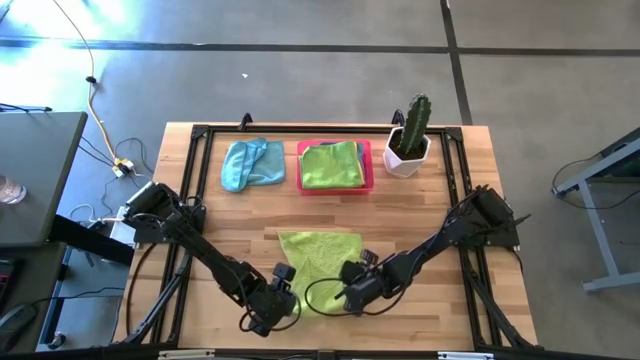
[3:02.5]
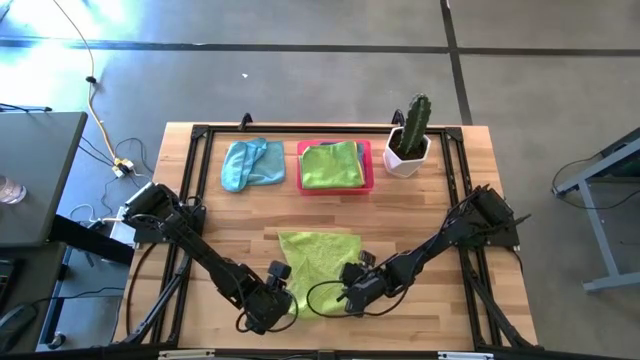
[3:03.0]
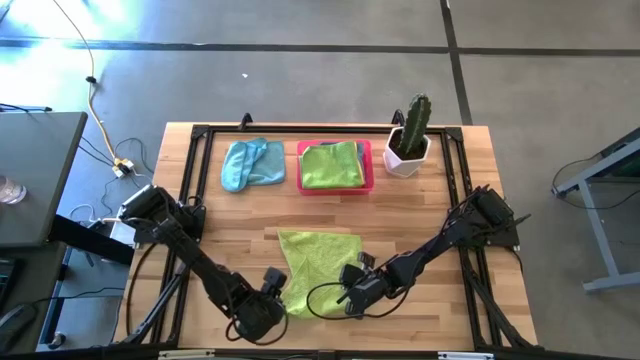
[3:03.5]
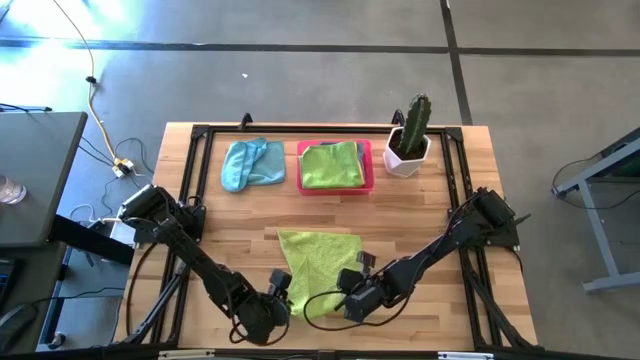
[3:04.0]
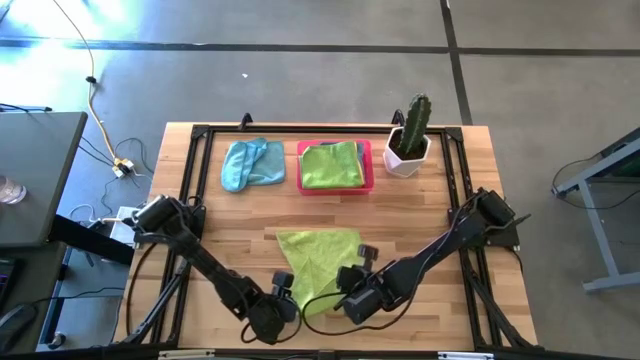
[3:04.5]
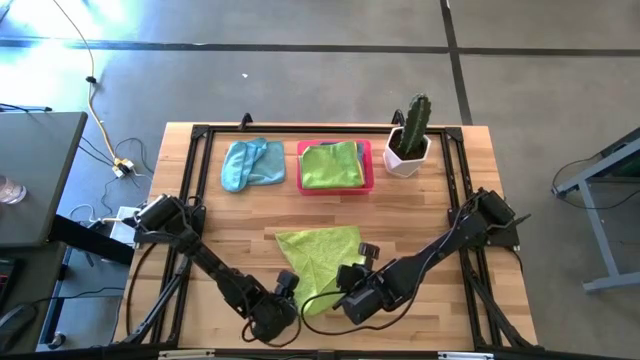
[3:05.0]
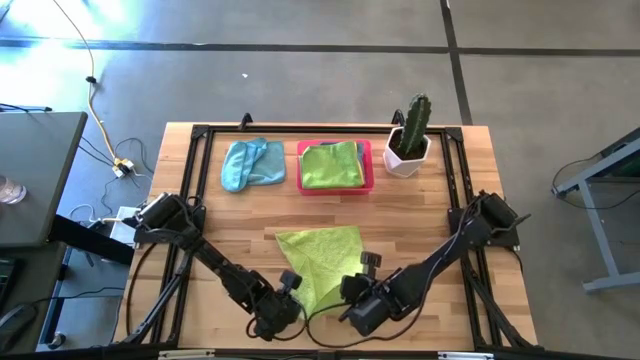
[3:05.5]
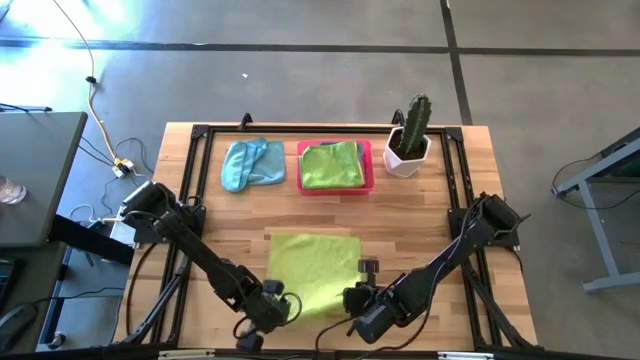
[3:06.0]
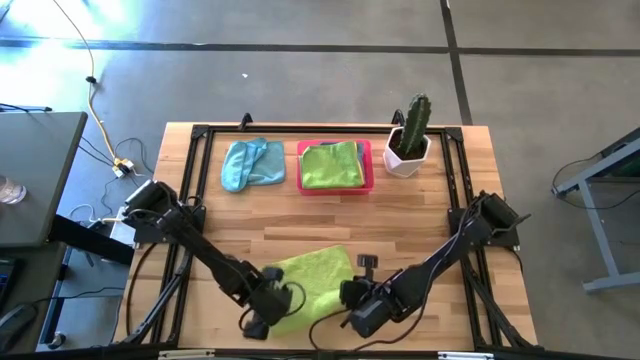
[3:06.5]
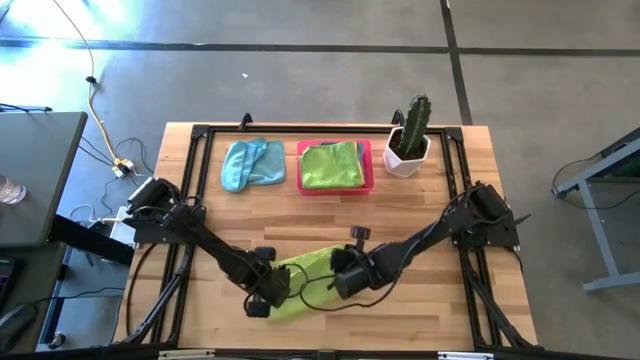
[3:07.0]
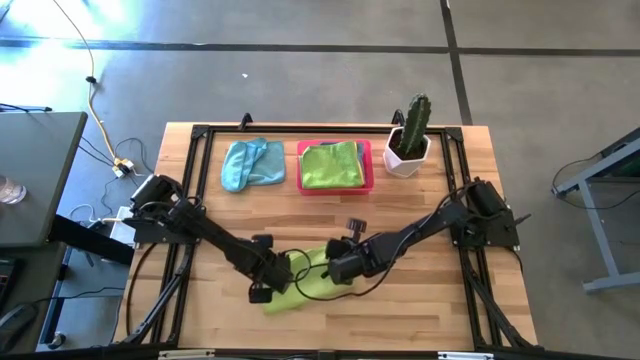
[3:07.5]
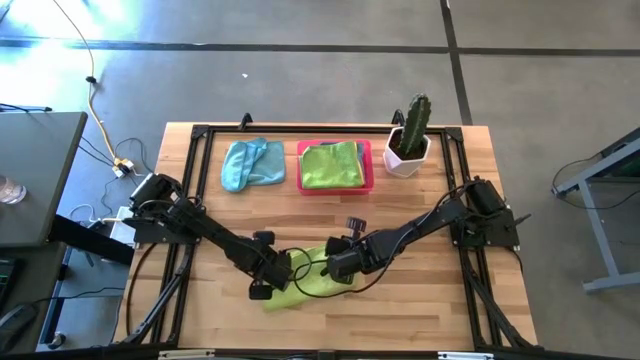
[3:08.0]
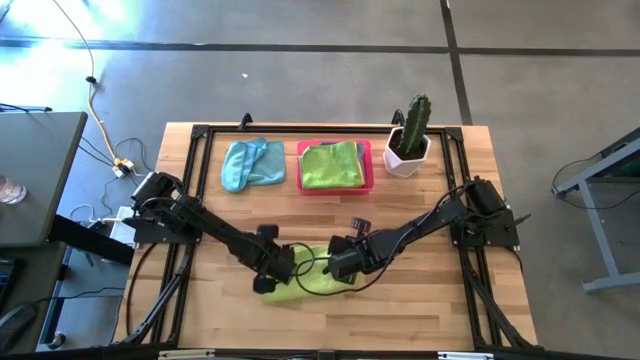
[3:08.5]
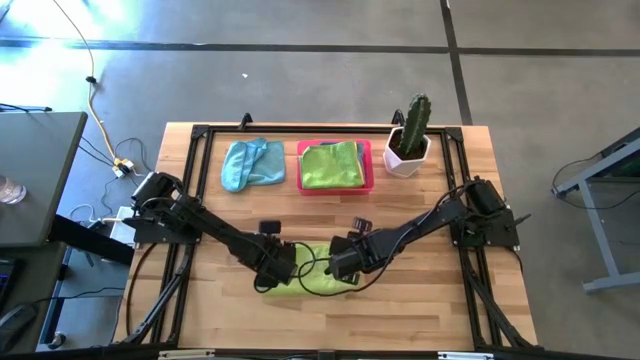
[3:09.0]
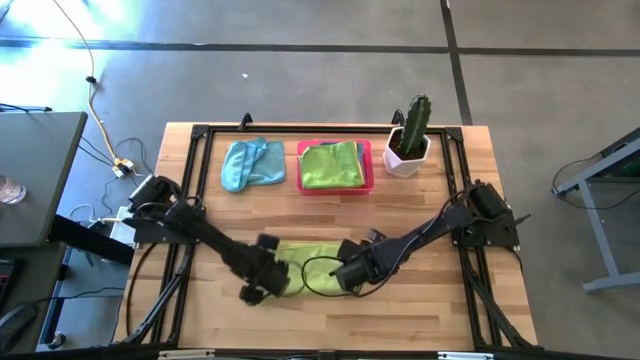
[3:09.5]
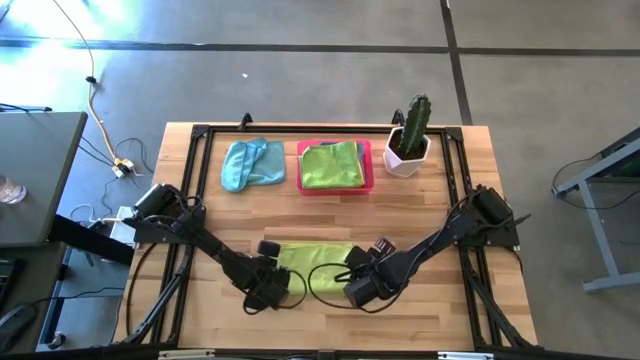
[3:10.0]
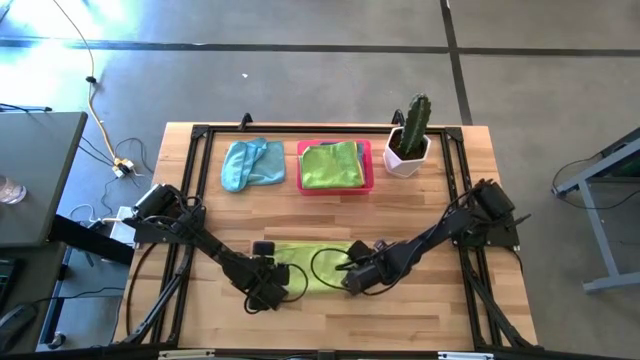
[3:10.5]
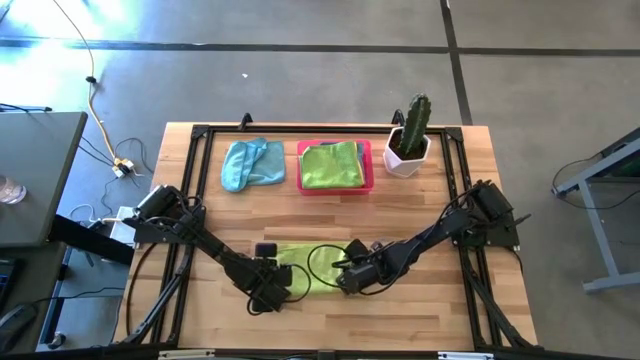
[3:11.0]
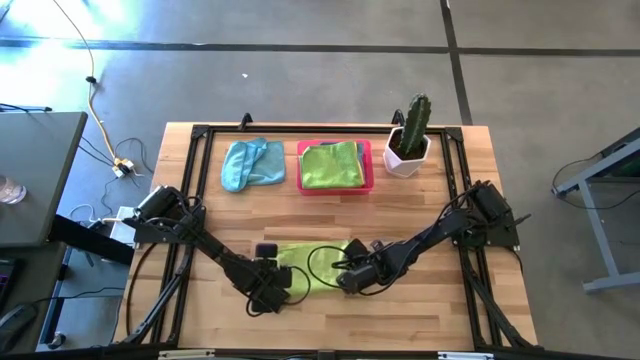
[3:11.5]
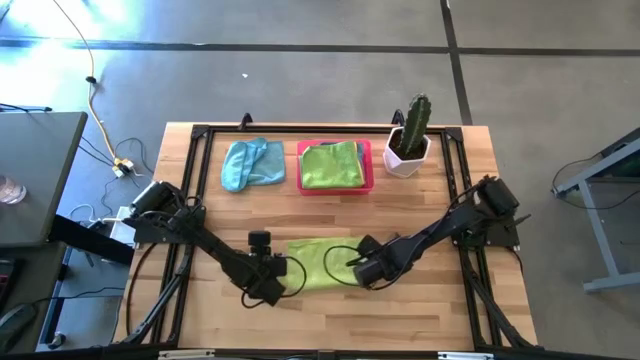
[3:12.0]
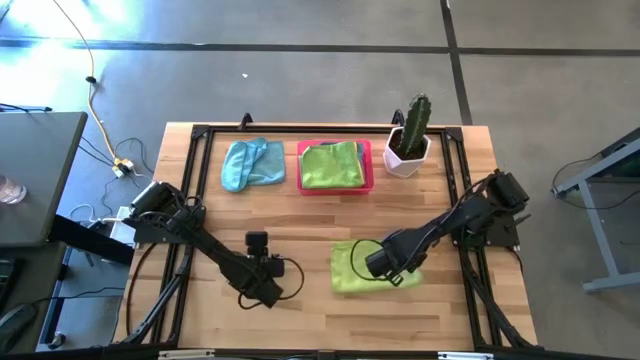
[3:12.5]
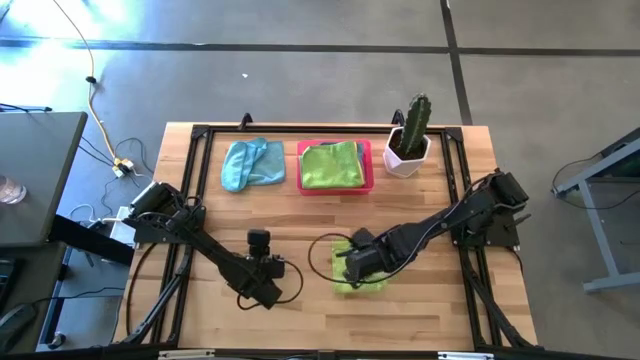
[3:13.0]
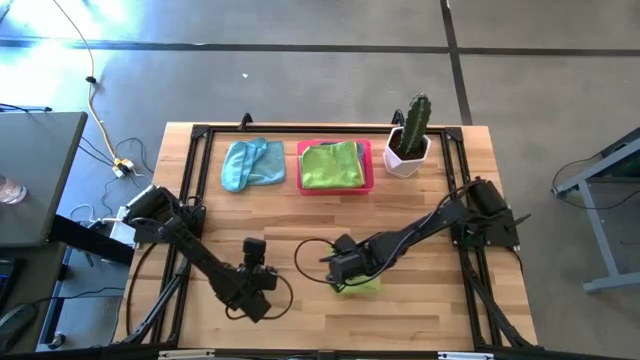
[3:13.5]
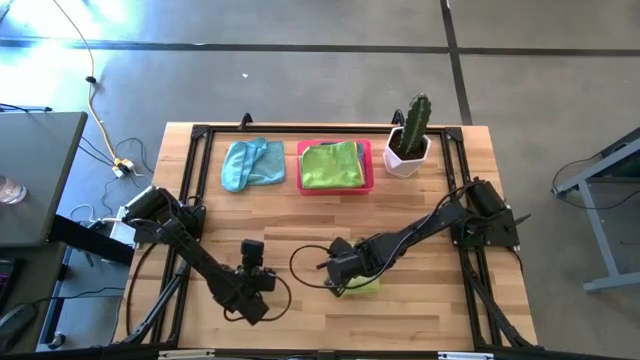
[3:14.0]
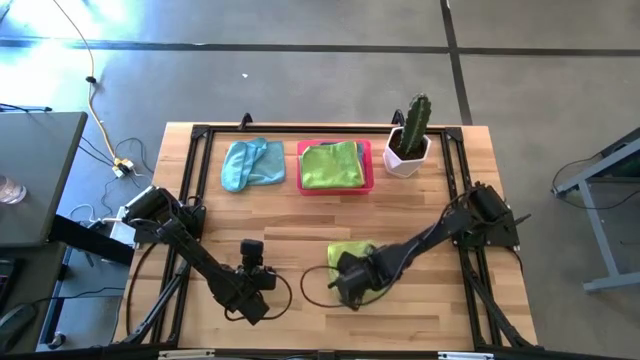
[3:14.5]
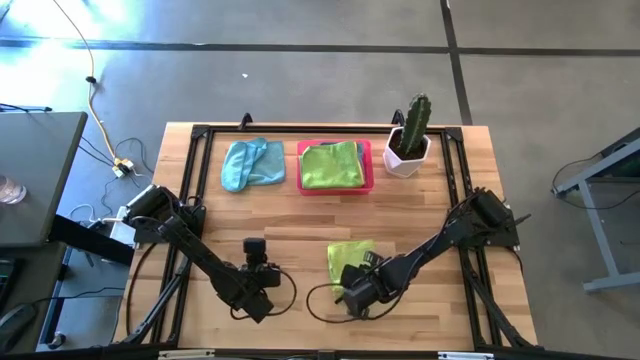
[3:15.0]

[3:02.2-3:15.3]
Task: Fold microfiber towels
Fold the light green microfiber cloth

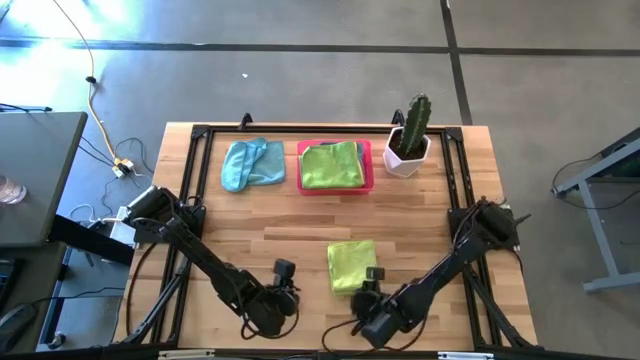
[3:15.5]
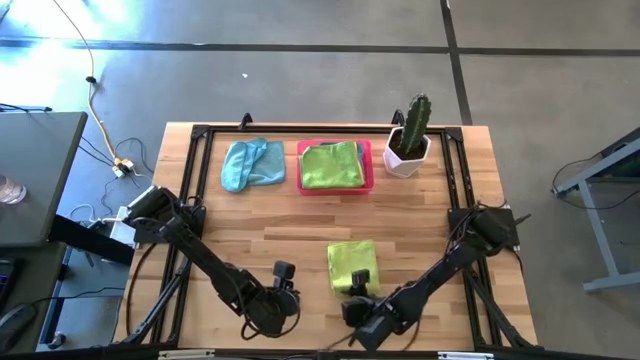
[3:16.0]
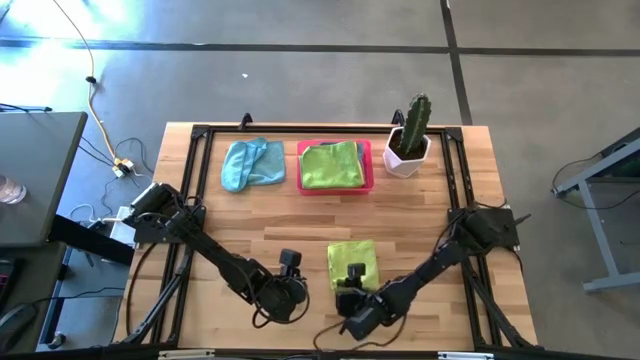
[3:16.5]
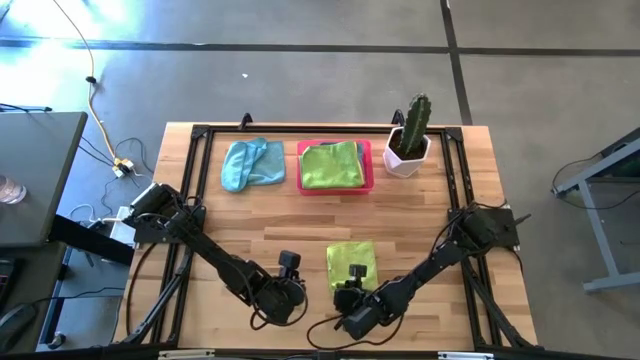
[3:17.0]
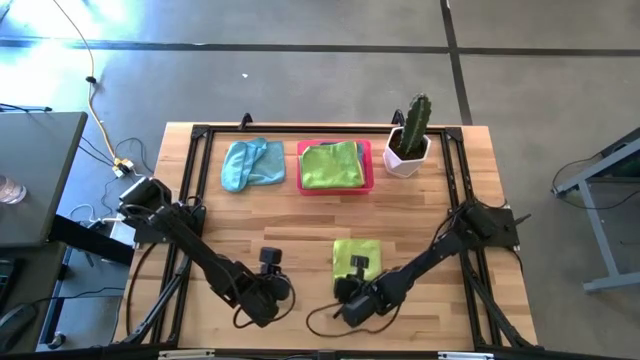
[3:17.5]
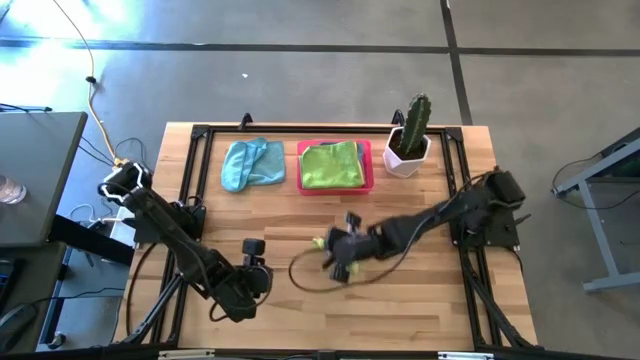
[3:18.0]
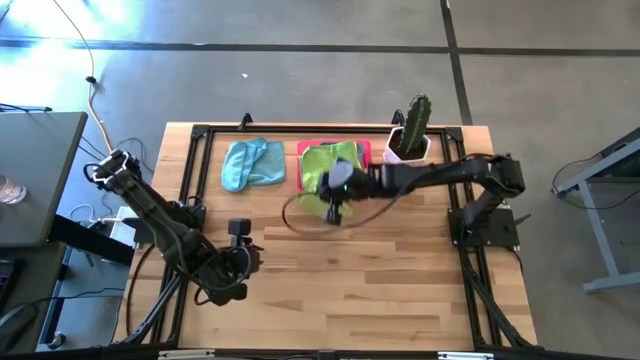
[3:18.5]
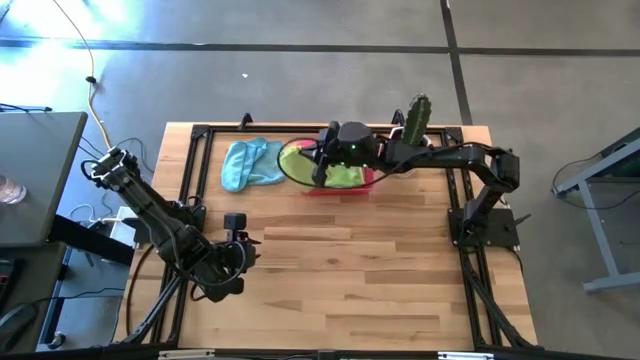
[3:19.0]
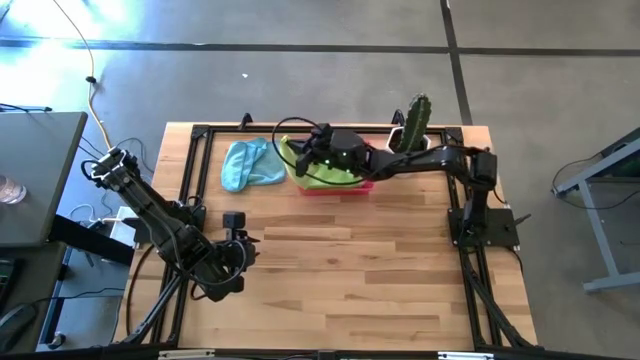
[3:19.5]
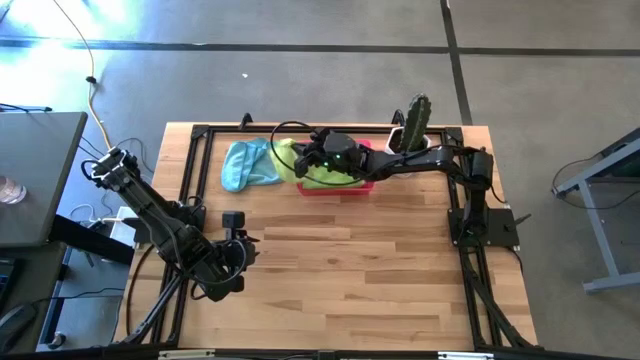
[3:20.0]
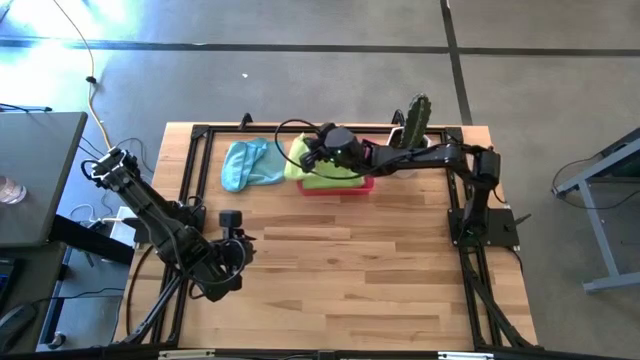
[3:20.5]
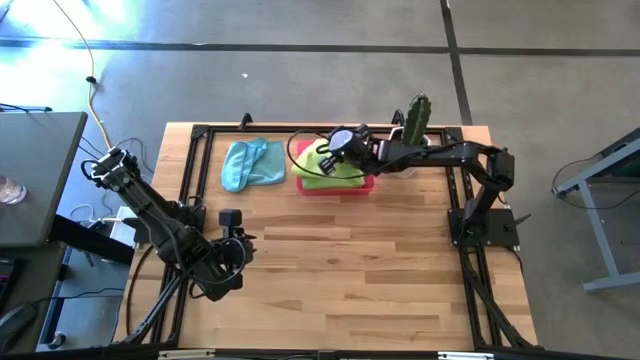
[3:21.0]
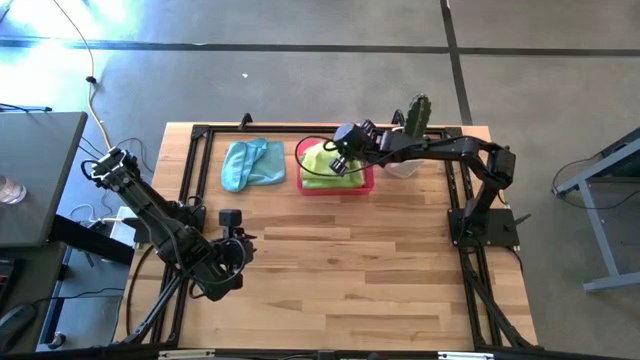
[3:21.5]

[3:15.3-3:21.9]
Stack the folded light green microfiber cloth on top of the green microfiber cloth in the pink bin
